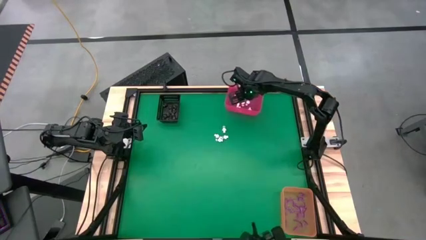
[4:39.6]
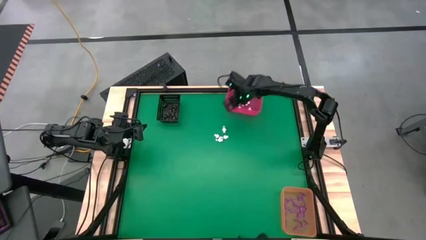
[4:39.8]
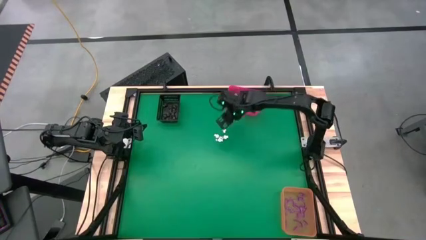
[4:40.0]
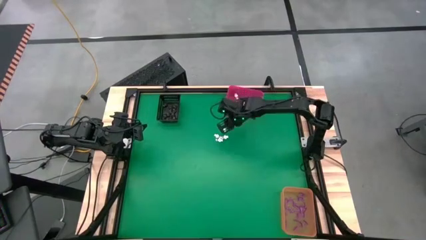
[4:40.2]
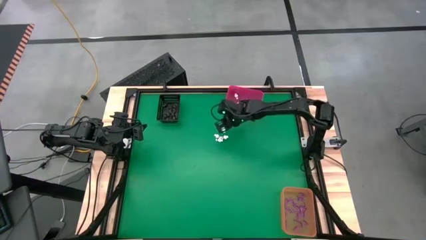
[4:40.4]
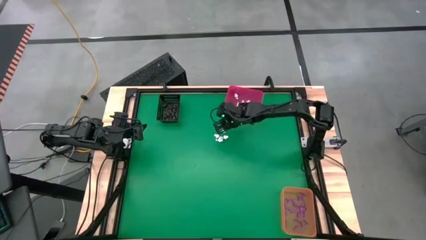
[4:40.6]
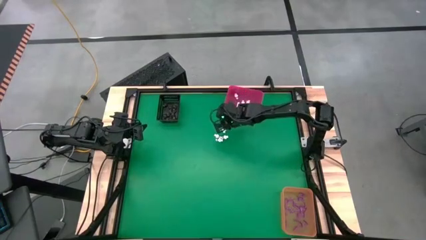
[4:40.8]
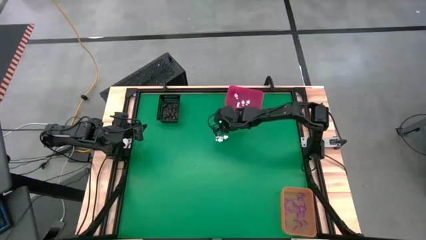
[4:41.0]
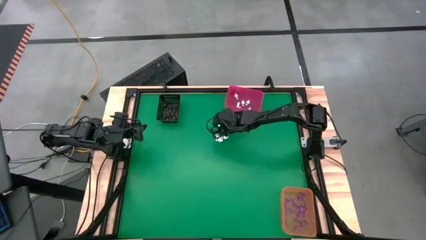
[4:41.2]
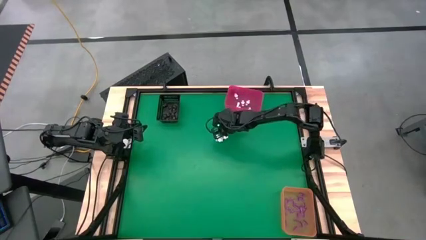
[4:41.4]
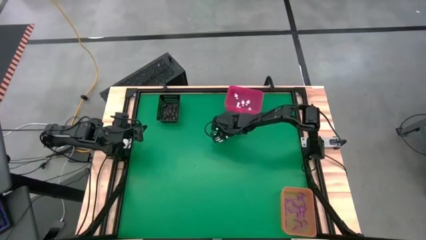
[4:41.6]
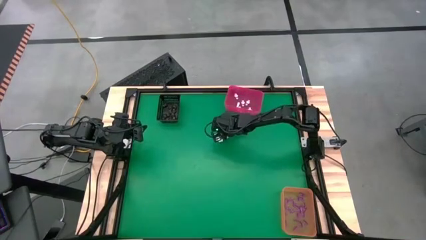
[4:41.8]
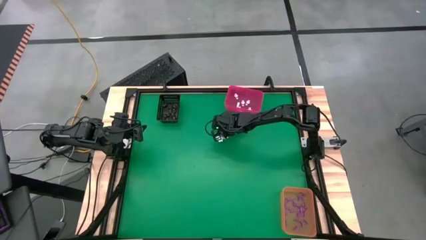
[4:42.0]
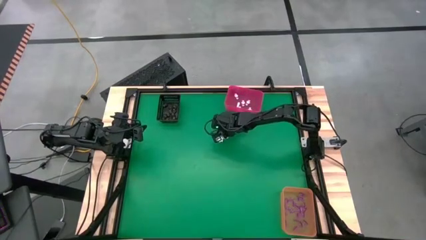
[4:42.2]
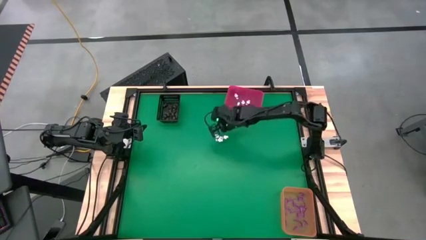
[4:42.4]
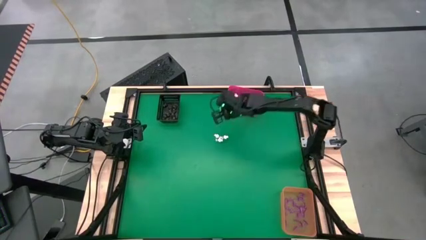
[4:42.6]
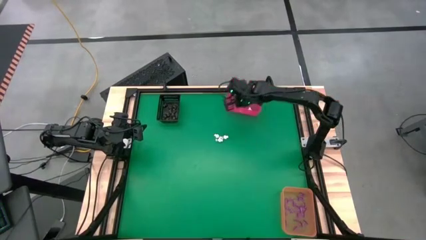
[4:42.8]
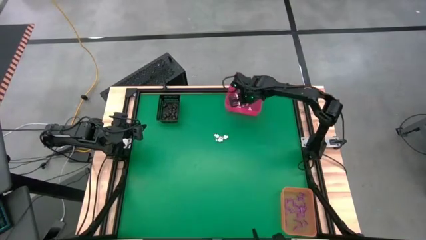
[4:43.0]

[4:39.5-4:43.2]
Task: Sort Halloween decoration
Put the white skeleton toy into the pink bin

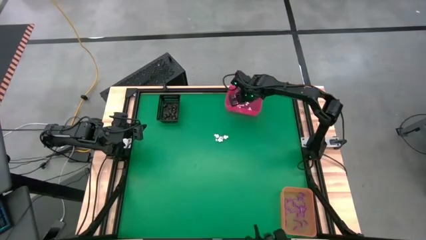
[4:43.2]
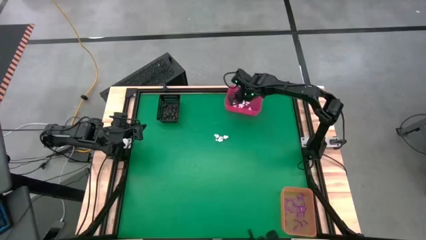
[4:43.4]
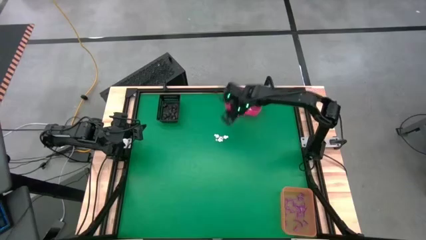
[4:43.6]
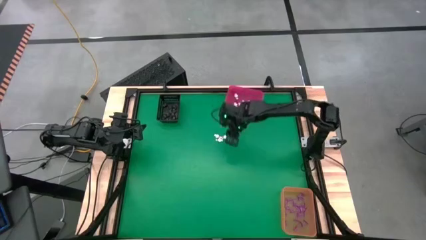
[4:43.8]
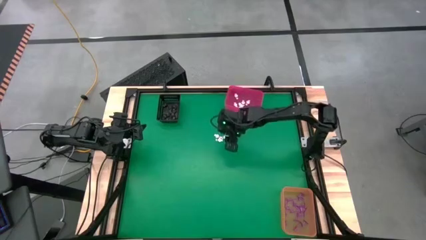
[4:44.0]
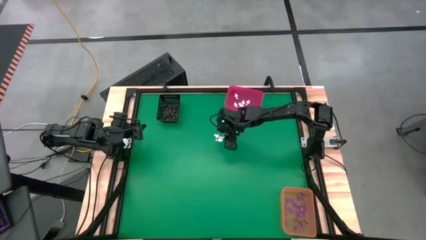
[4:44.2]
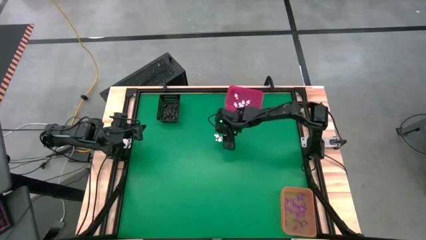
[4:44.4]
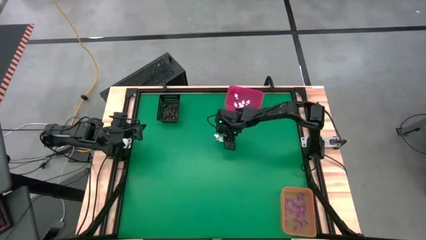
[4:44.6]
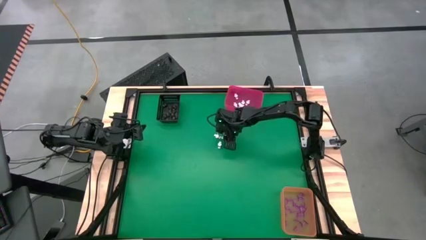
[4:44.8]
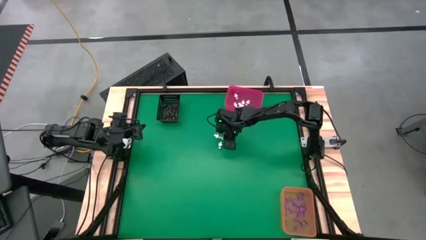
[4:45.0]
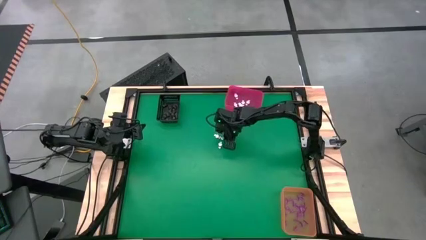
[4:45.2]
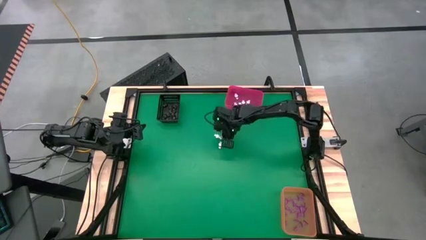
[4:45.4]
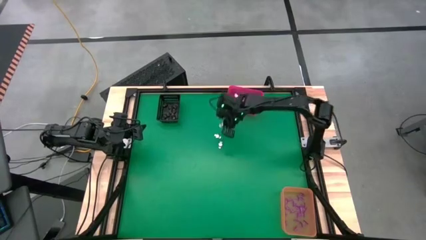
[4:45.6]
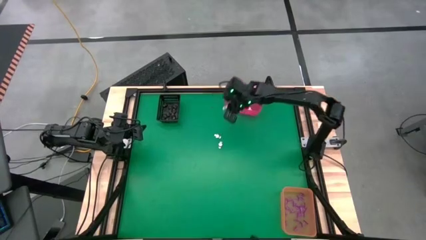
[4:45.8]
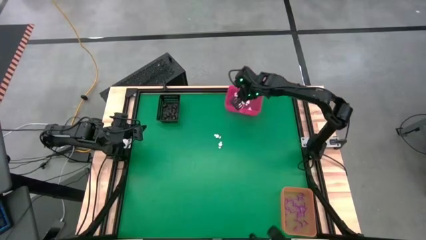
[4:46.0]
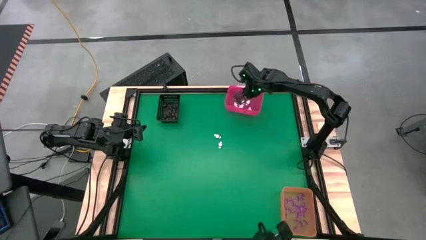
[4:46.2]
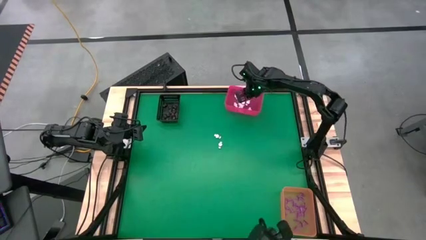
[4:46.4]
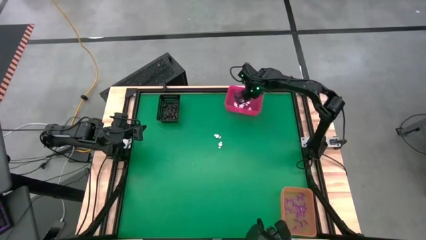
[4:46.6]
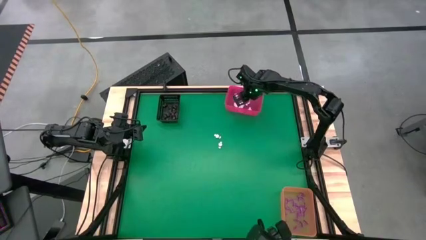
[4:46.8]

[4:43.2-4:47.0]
Put the white skeleton toy into the pink bin

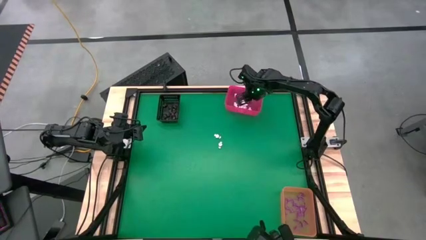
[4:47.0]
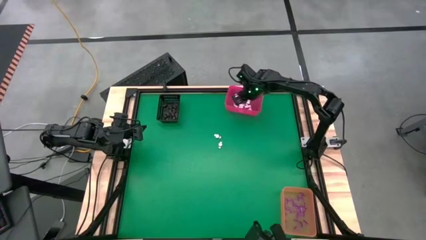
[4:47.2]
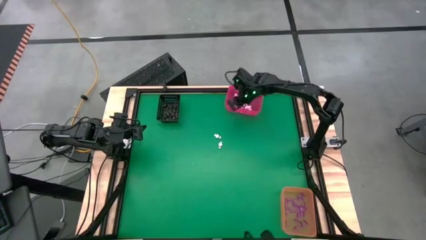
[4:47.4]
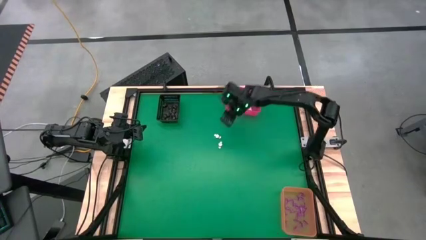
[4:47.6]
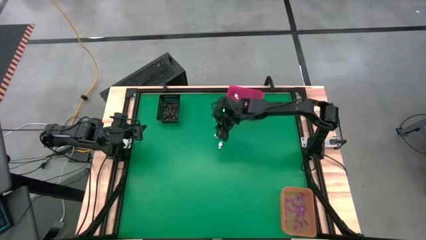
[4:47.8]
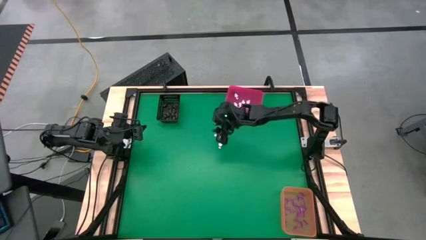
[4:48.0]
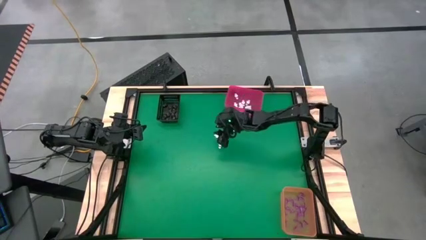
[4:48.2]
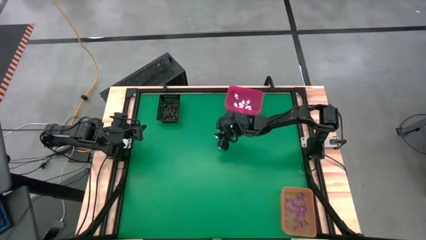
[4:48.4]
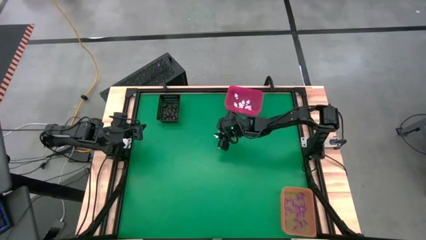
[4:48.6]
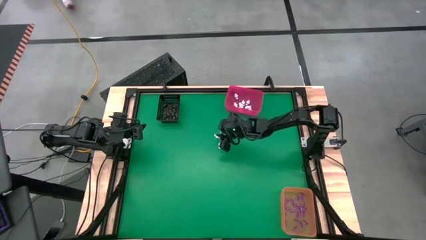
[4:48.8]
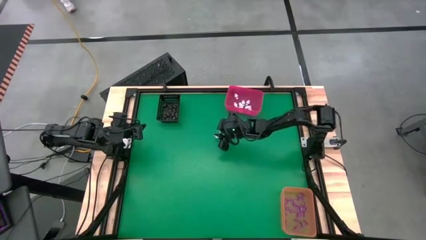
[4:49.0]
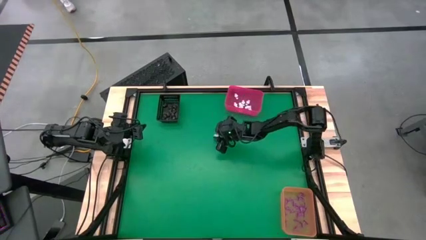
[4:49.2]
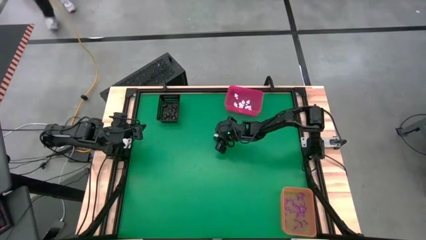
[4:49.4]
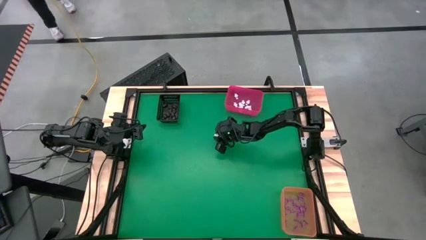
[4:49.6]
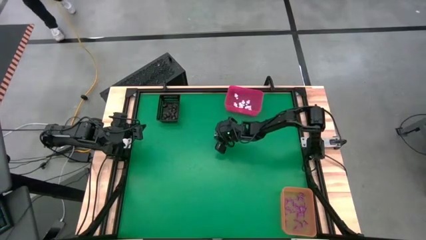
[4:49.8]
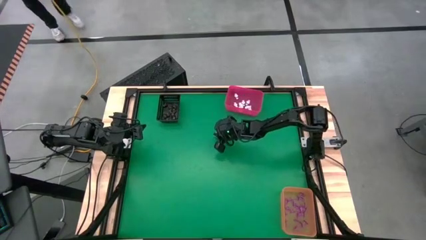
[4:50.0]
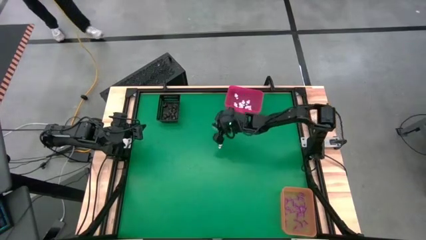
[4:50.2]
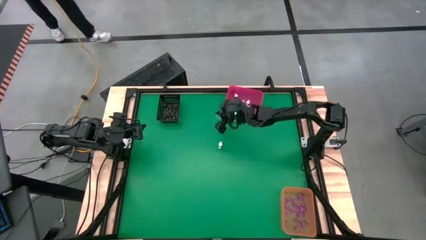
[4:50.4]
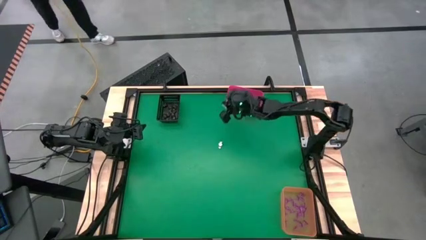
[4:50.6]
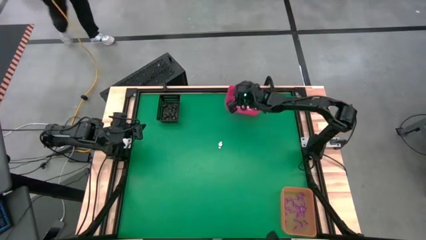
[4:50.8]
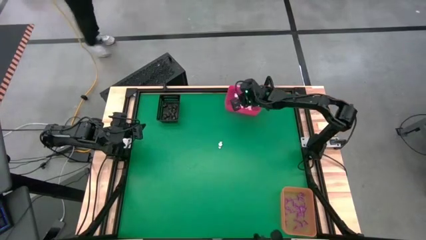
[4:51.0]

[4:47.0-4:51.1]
Put the white skeleton toy into the pink bin

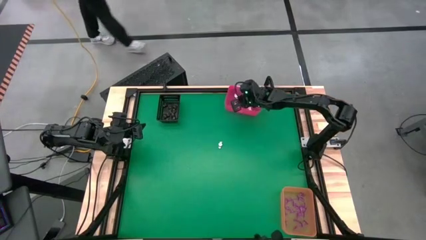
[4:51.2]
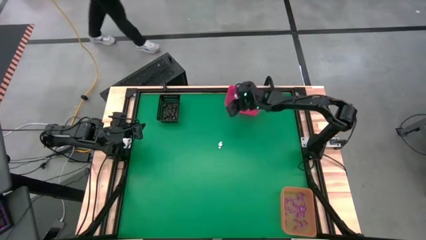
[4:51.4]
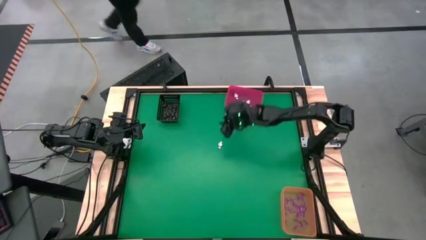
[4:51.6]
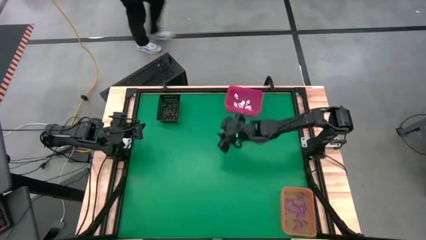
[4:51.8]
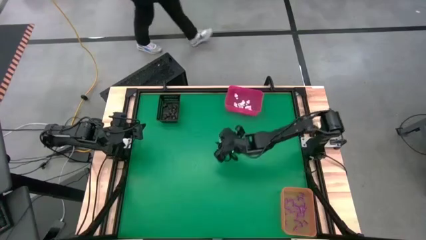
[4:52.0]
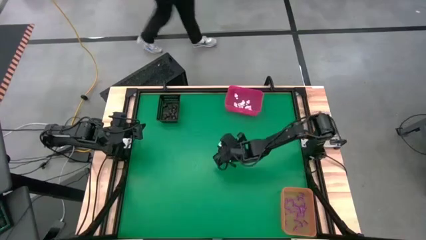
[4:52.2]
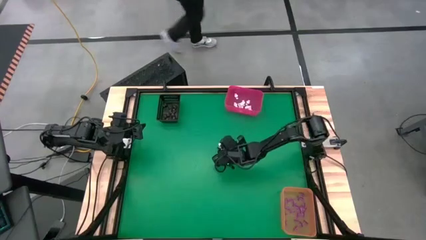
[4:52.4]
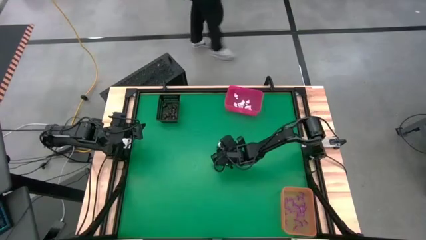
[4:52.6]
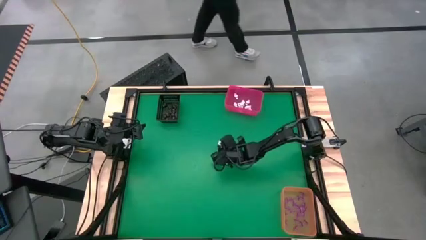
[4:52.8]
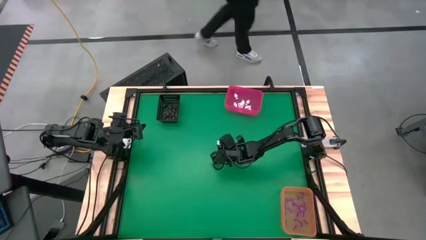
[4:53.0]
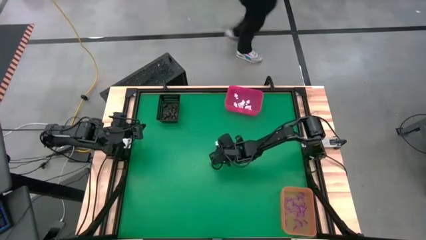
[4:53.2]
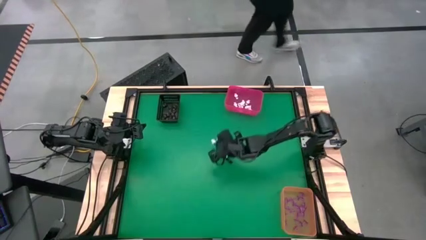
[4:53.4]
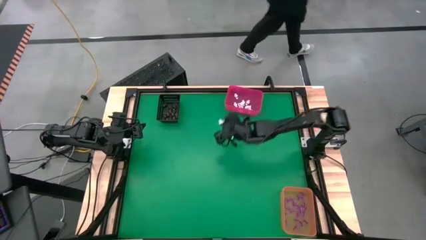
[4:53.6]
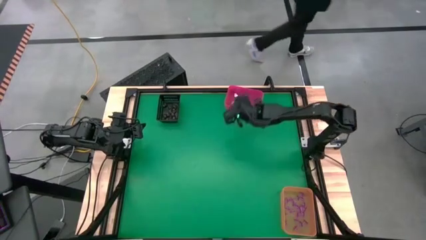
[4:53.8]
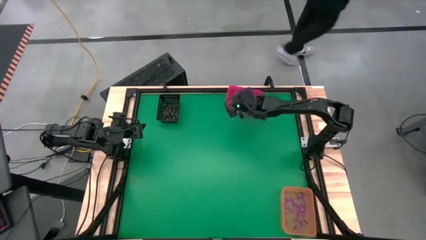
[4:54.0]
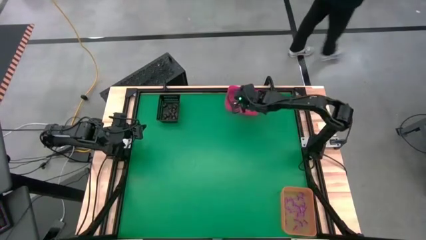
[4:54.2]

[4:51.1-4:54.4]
Put the white skeleton toy into the pink bin

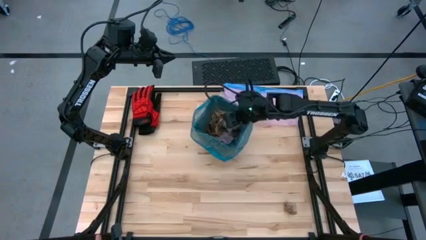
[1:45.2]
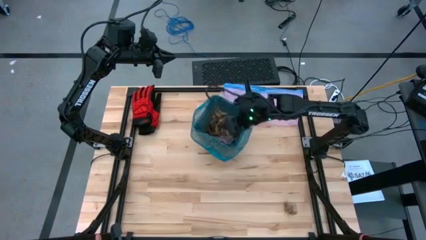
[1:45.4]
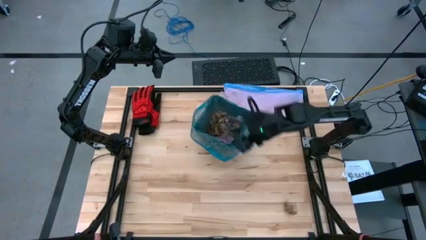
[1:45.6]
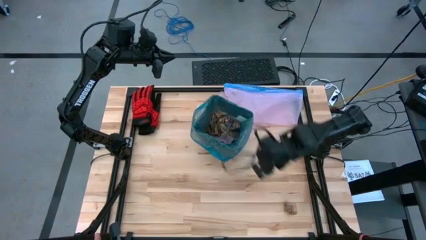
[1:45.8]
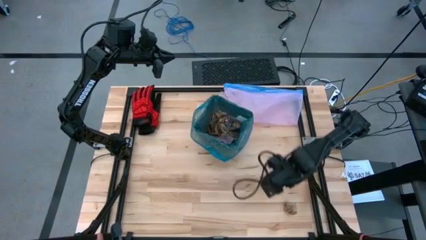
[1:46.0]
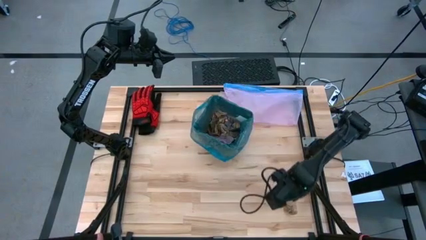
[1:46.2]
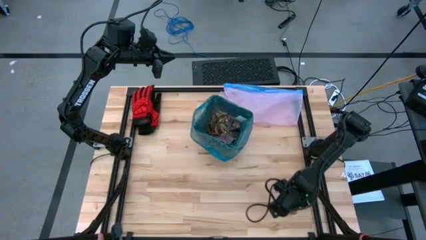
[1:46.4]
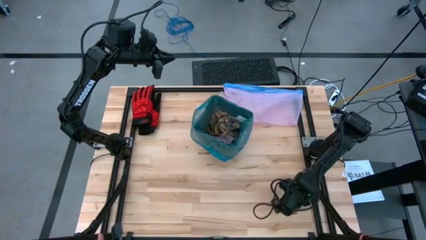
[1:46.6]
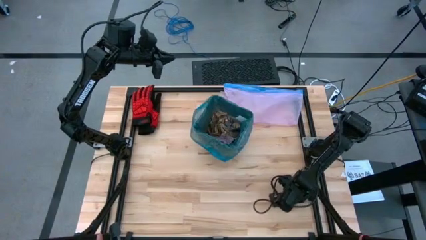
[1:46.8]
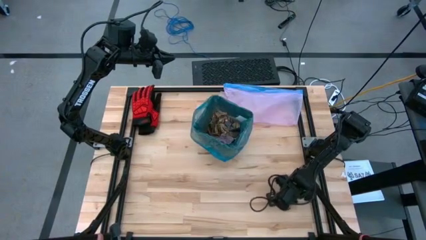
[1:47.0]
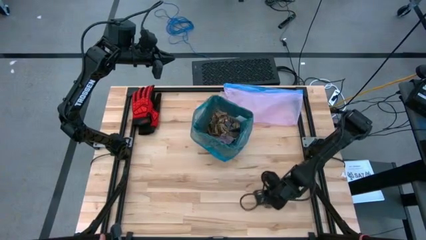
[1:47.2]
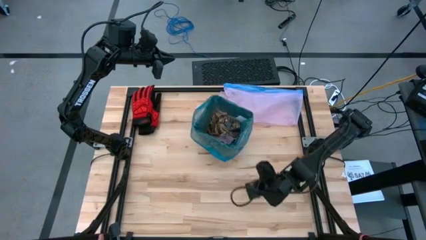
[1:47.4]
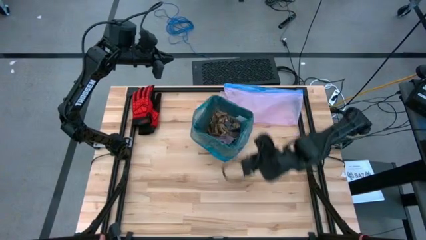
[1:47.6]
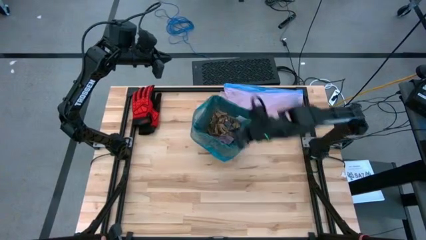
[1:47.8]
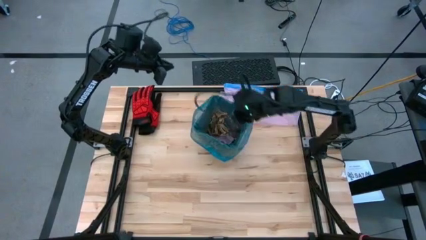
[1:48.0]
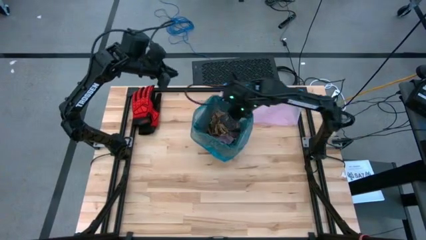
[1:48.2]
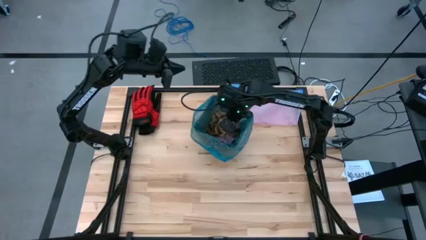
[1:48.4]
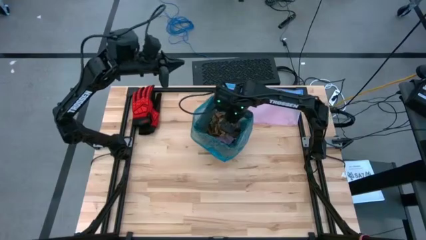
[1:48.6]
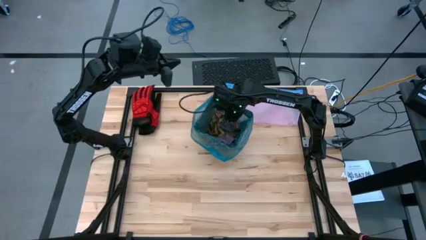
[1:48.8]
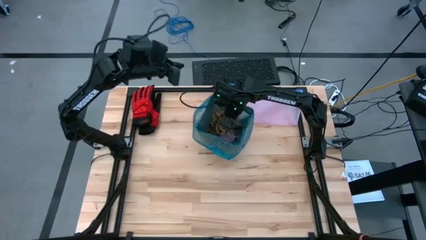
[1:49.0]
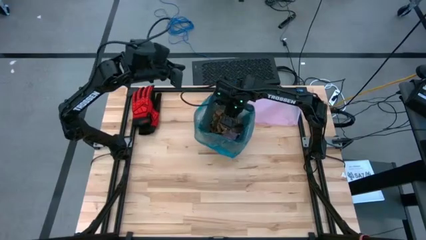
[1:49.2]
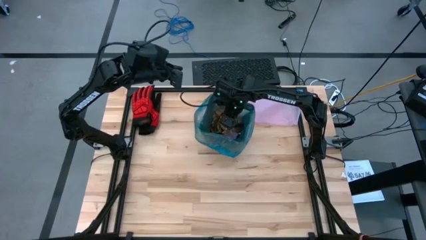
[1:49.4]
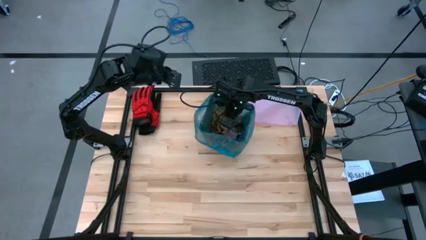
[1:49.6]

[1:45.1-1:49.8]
Task: place trash/remove bag and relplace
Put the brown napkin into the black trash bin
